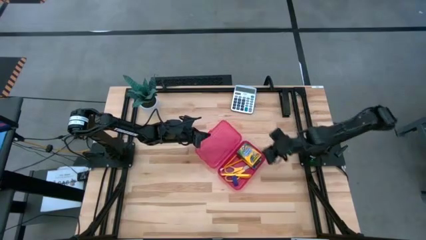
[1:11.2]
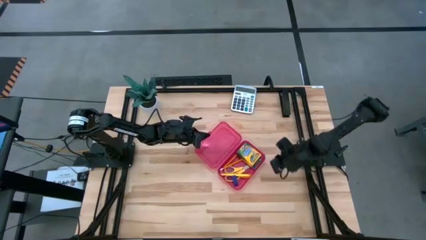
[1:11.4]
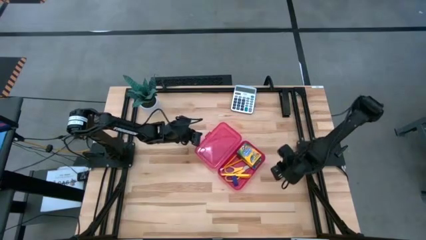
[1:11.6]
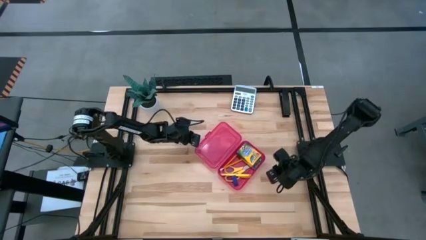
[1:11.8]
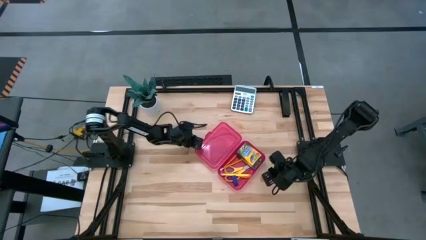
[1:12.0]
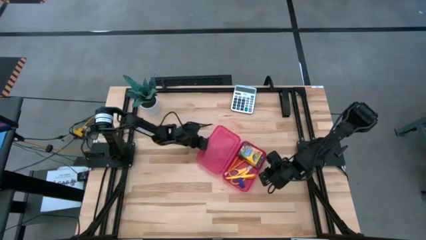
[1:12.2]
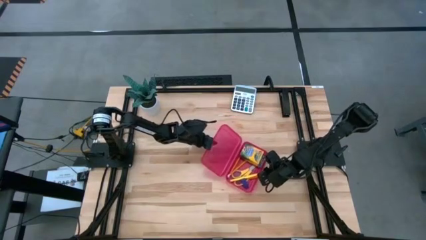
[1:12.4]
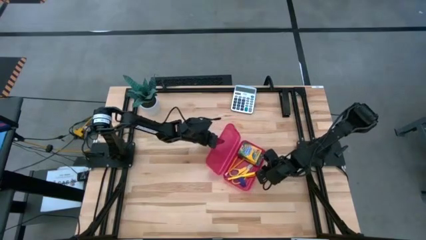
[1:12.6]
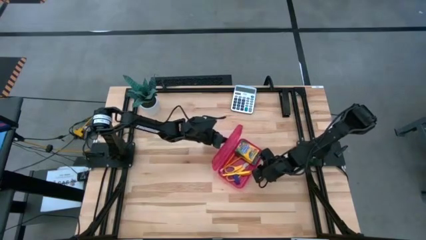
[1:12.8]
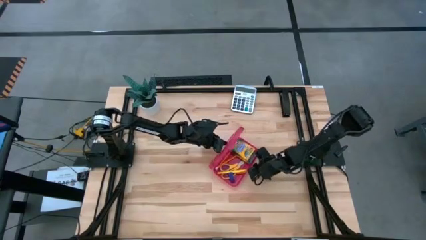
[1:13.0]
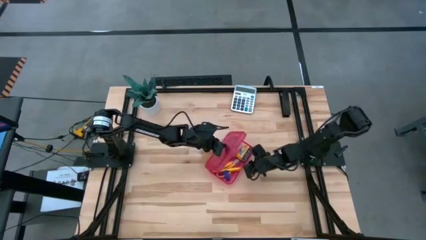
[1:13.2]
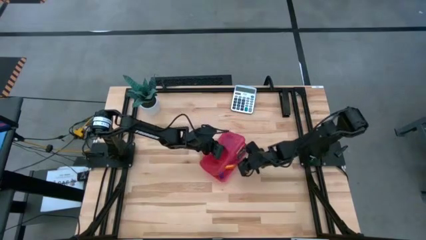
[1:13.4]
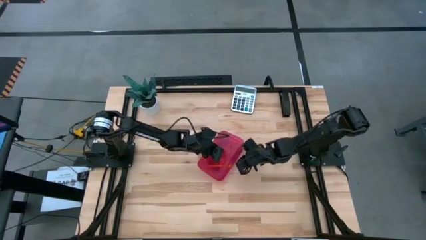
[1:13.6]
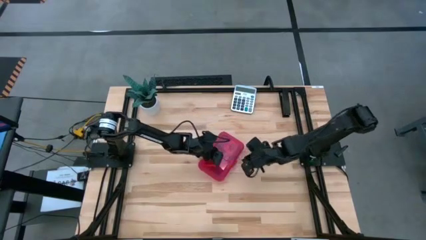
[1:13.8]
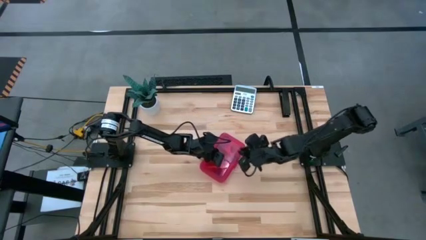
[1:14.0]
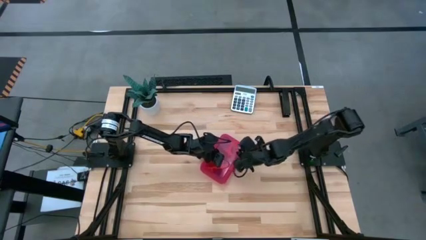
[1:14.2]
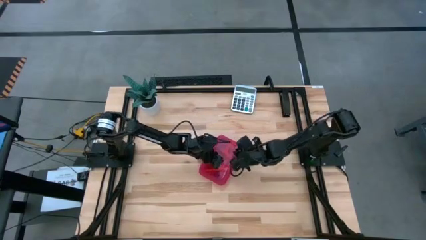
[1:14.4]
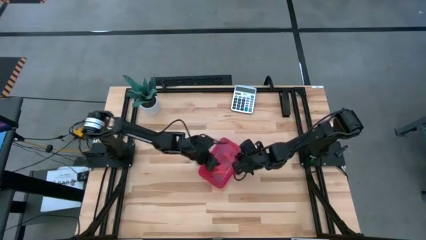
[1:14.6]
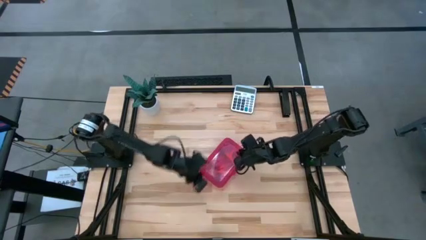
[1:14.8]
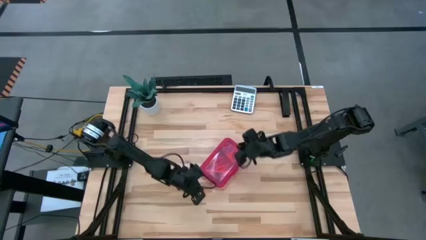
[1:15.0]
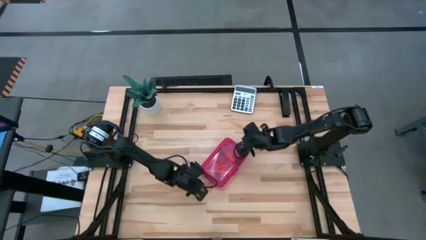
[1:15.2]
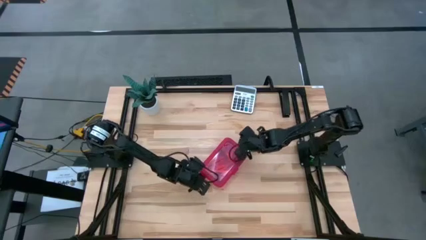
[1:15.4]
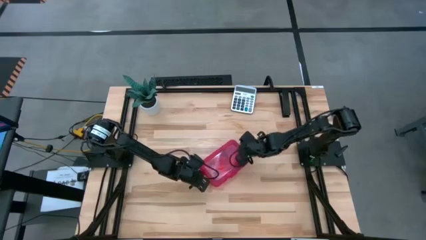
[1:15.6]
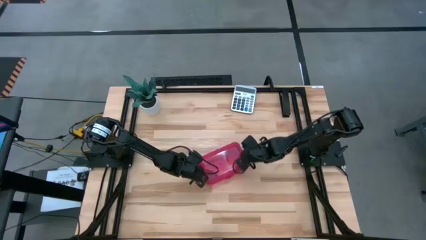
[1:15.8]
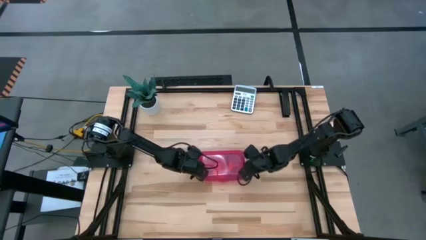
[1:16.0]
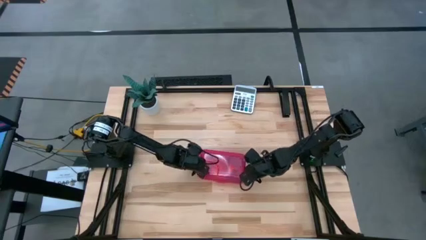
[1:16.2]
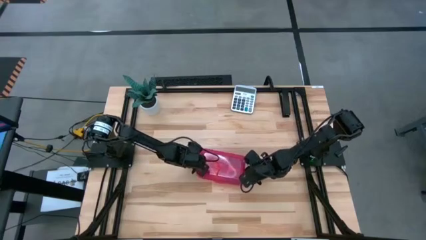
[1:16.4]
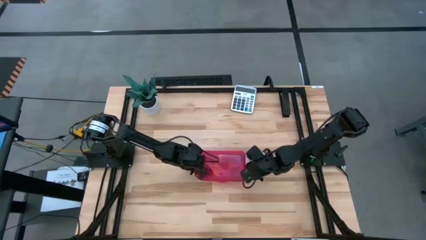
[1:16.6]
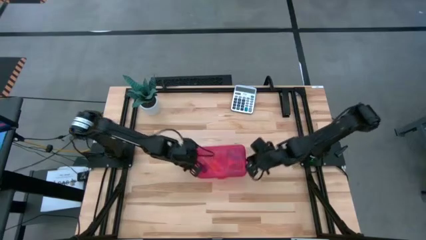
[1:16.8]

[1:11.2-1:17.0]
Task: Pack school essentials
Close the red supply box

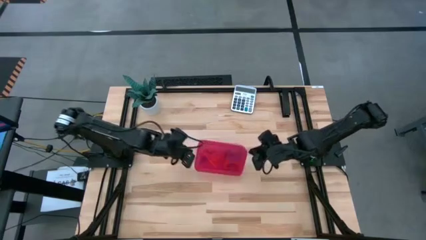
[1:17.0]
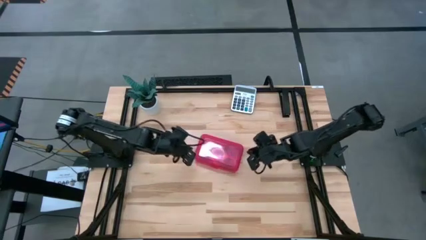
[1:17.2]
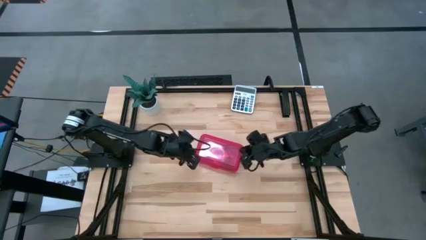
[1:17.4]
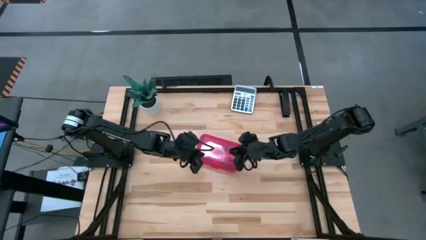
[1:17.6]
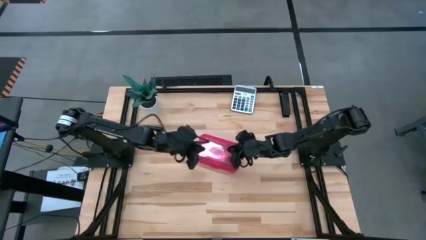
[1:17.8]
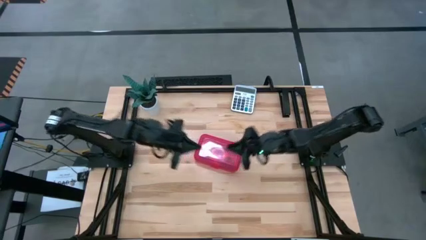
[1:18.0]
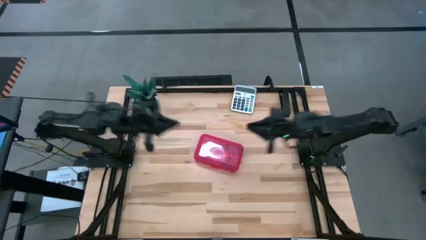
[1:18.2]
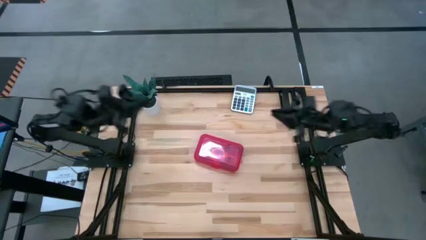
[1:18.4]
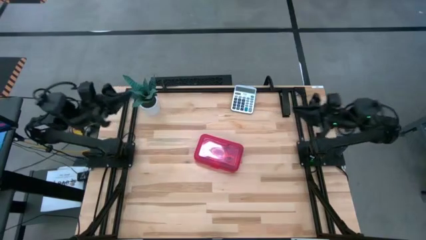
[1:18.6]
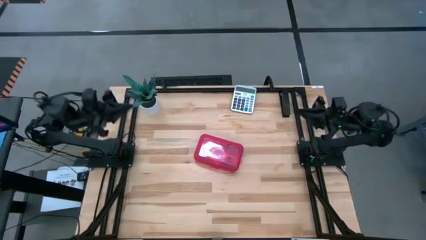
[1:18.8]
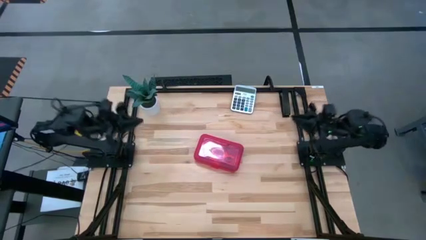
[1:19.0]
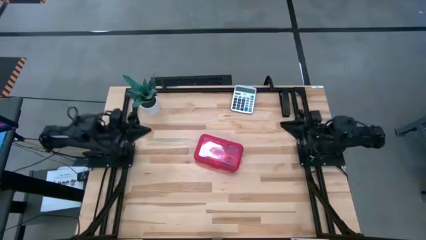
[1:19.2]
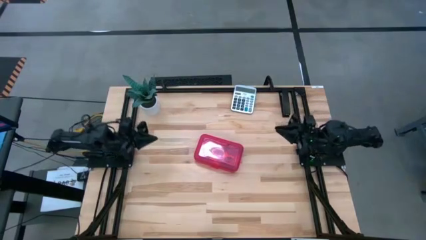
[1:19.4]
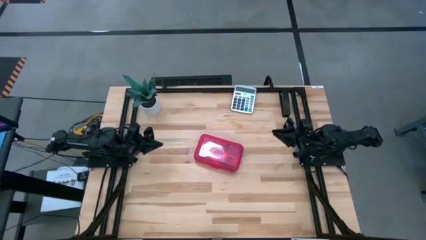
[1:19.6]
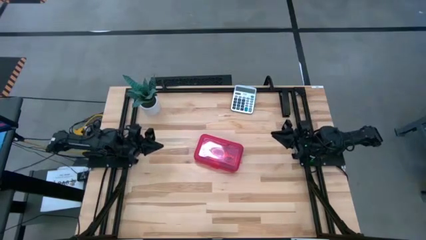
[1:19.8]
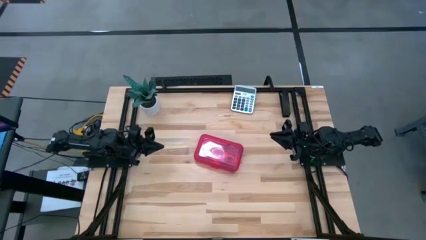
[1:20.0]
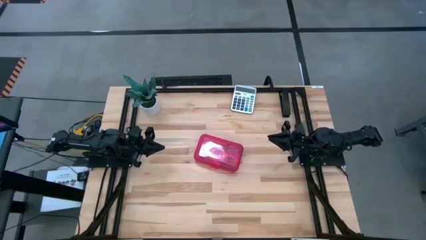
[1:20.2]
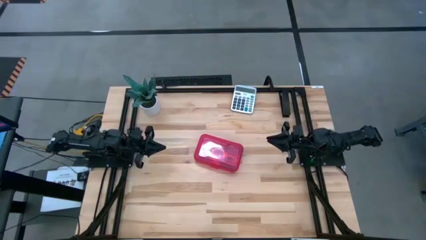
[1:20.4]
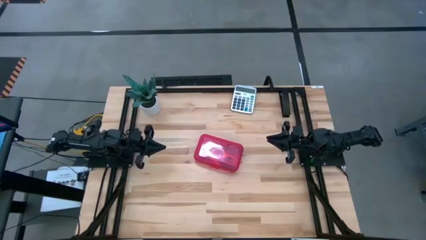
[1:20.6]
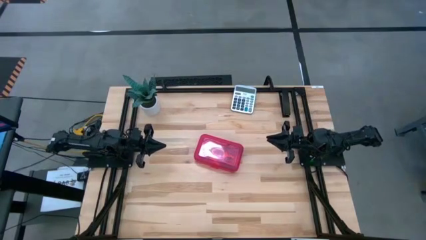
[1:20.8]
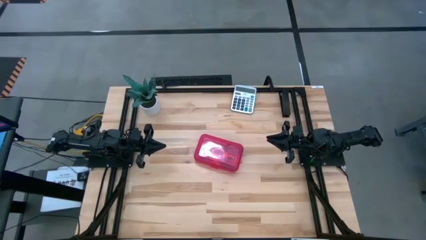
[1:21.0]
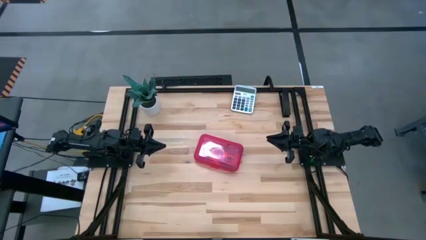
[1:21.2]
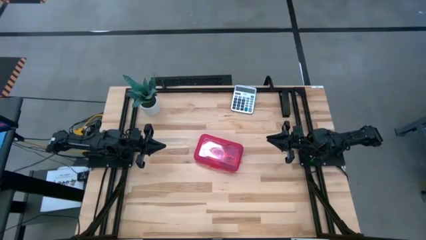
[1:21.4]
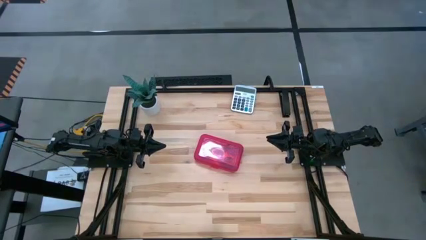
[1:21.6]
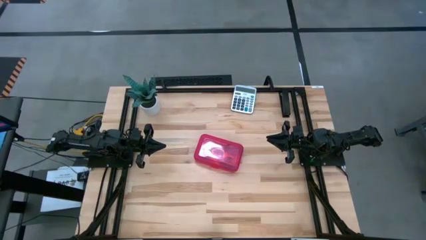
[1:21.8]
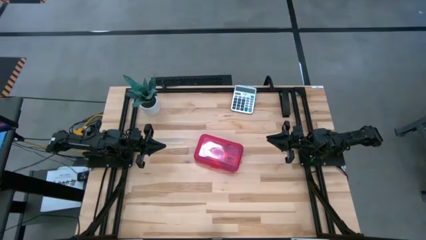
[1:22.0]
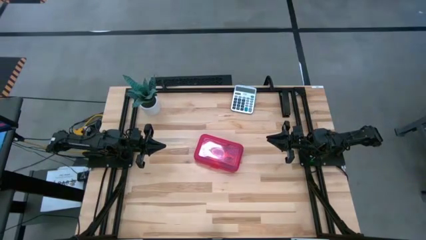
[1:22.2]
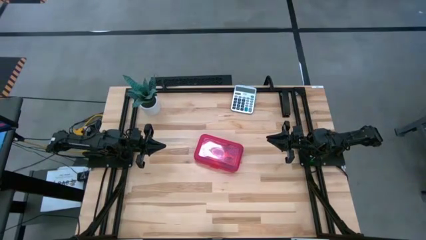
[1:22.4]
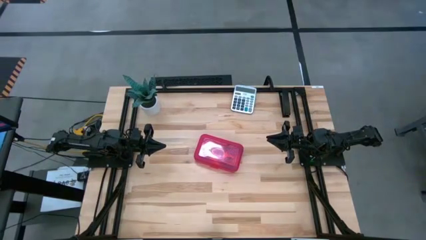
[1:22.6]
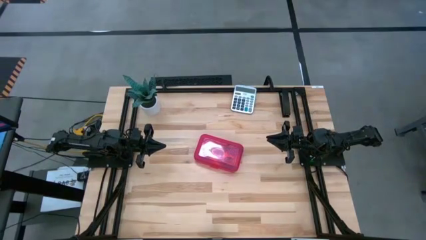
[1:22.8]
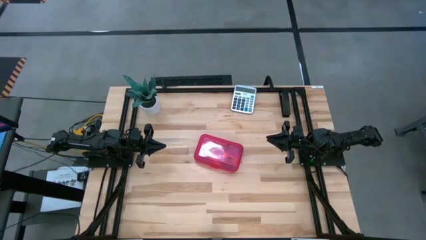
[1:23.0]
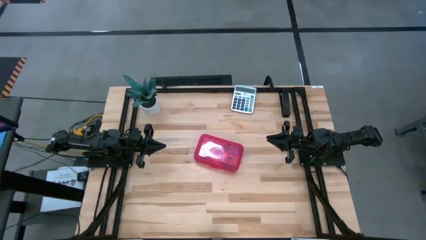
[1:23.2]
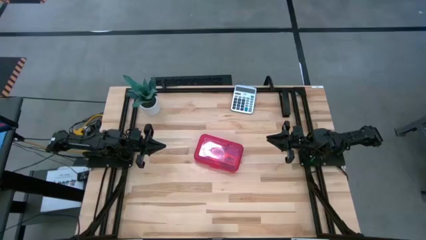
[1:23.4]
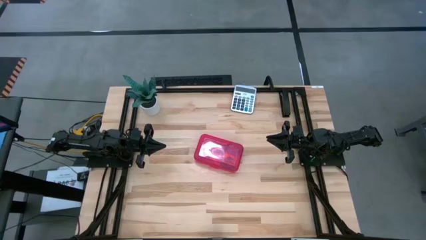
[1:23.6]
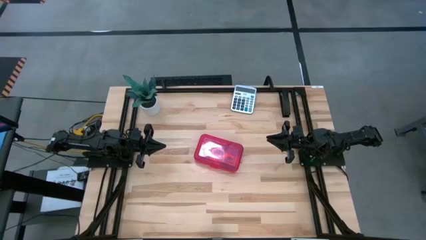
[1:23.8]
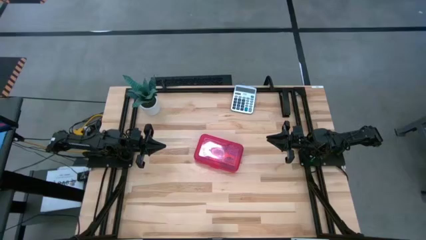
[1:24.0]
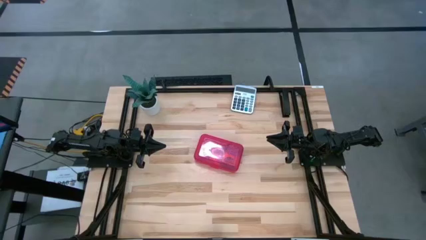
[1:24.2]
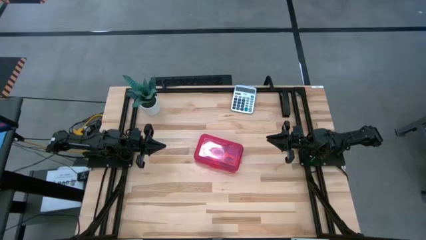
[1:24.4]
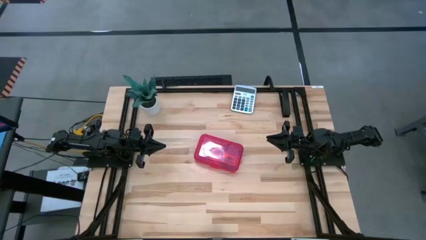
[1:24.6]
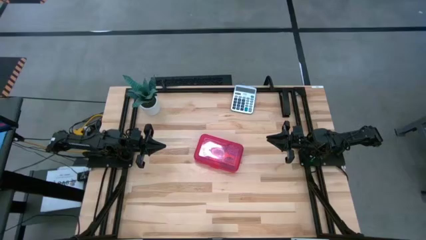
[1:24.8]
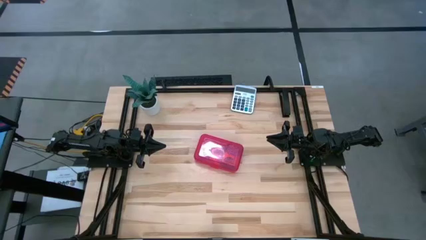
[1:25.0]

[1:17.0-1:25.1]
Return to Home Position

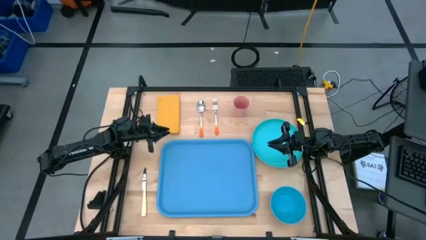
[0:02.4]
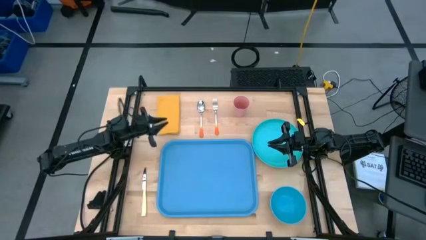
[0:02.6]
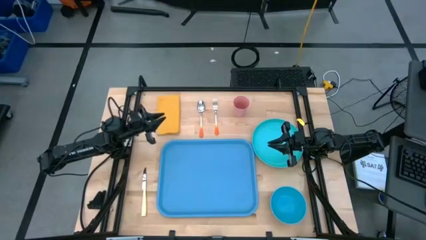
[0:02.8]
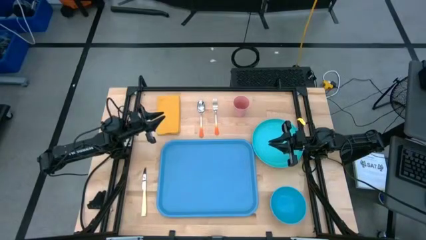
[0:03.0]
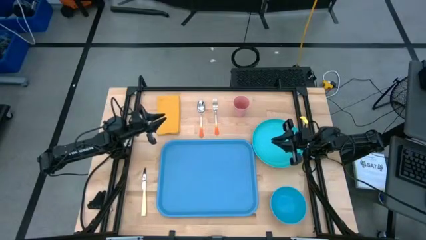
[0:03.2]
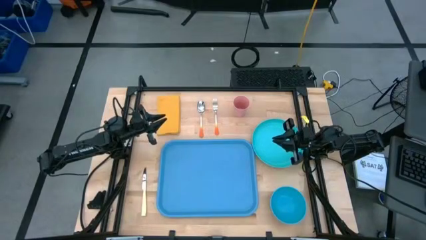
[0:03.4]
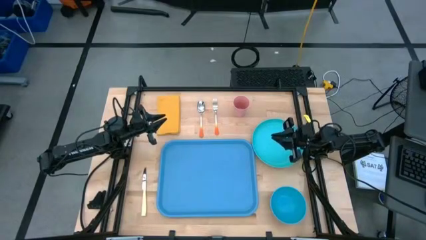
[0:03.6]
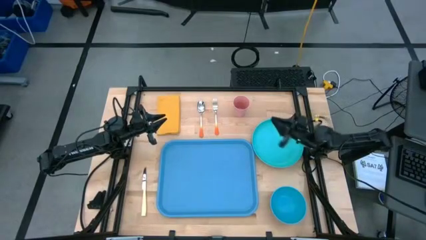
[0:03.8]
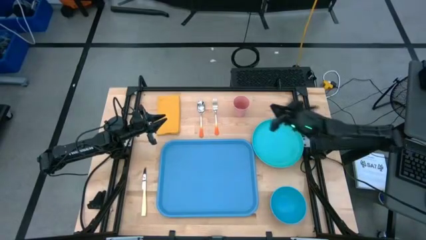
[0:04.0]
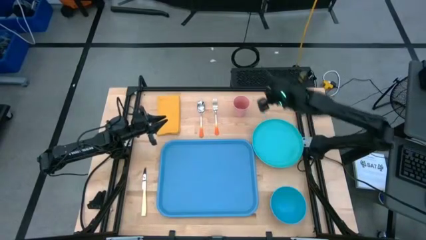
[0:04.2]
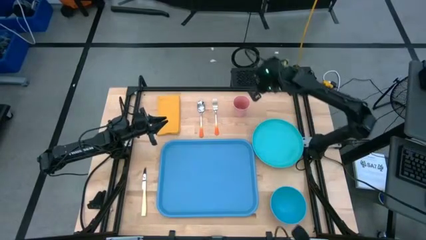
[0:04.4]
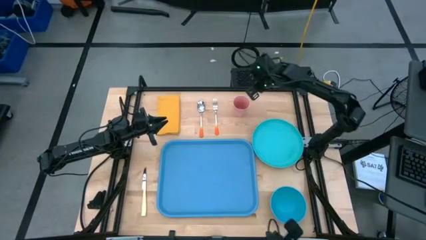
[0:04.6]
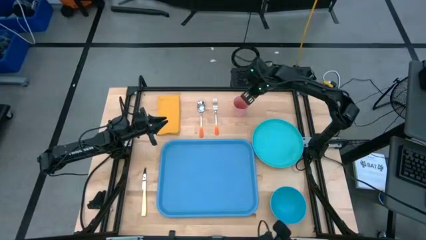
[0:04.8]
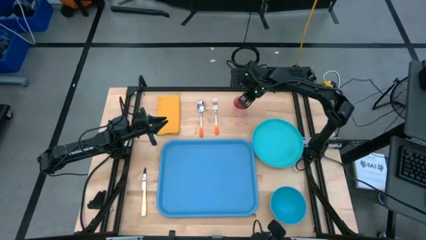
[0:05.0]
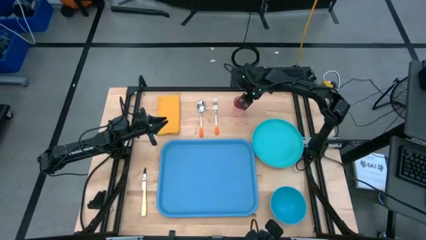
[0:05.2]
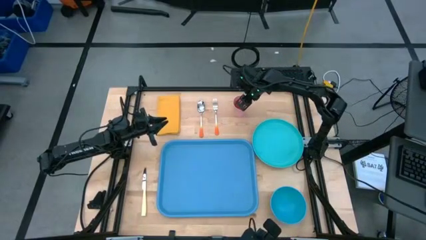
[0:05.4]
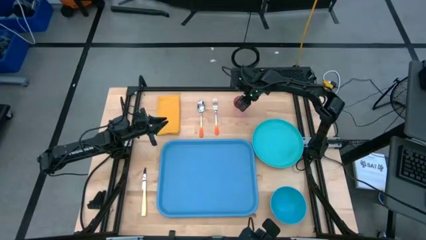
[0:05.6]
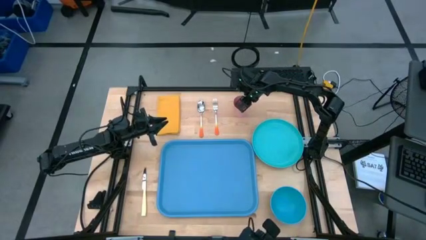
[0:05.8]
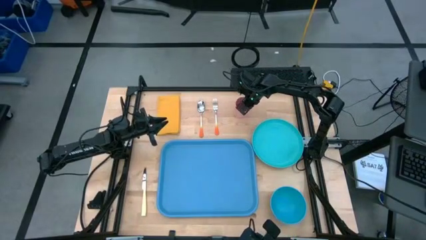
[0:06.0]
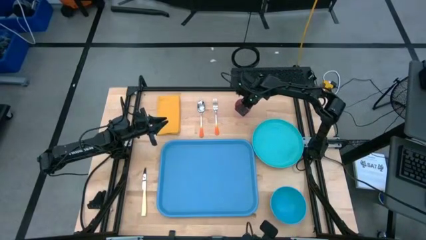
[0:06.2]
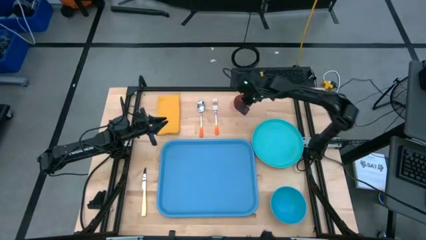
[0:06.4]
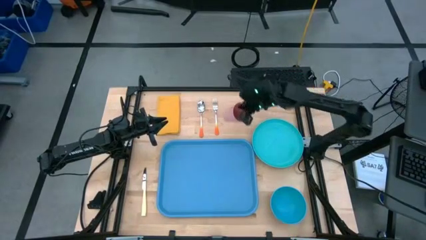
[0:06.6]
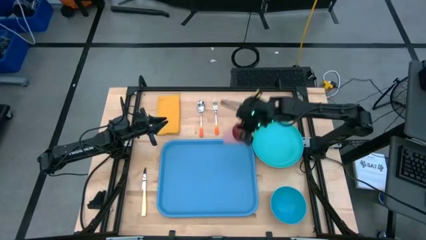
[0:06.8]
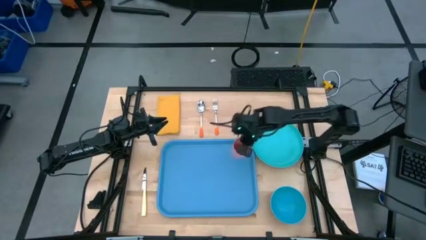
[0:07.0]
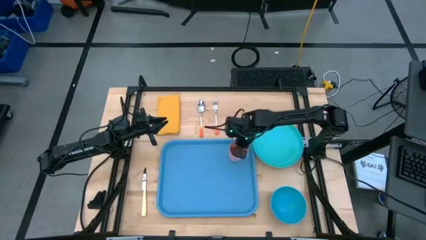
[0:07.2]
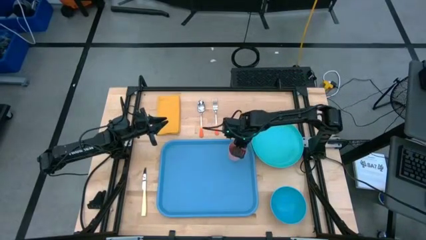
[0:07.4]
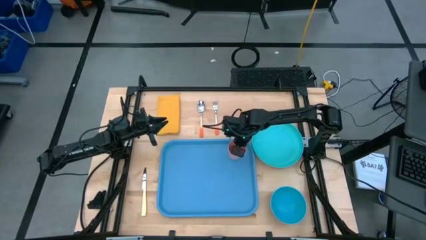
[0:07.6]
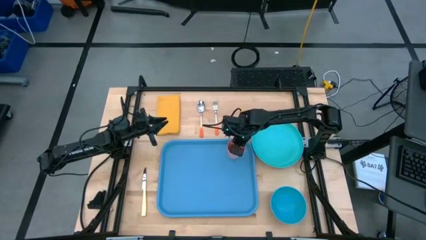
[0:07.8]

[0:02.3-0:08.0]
Task: Set up tray
Put the pink cup on the blue tray
